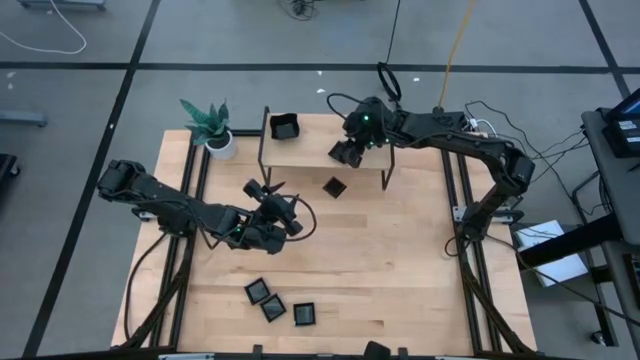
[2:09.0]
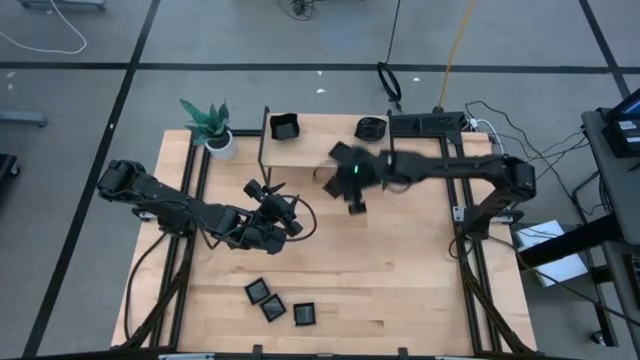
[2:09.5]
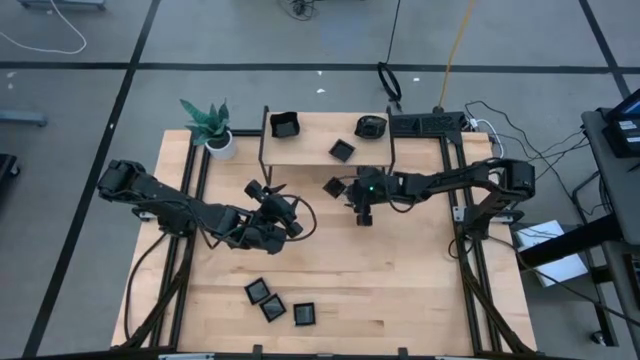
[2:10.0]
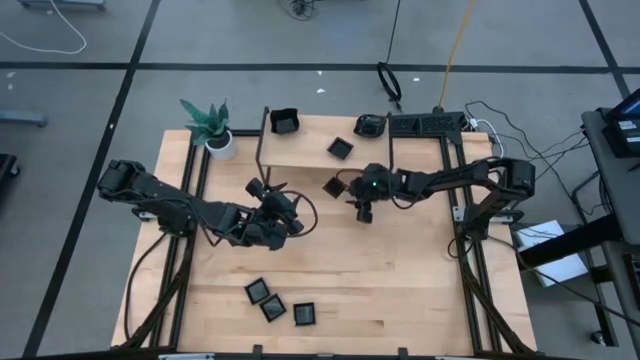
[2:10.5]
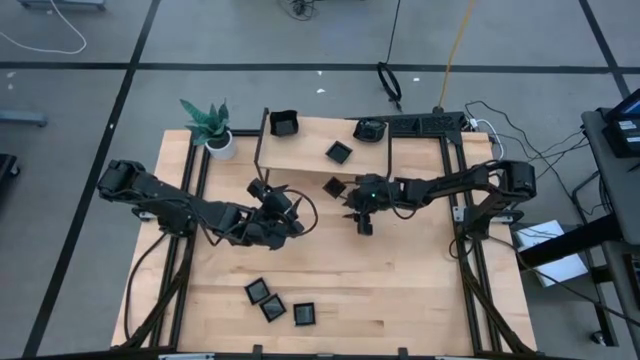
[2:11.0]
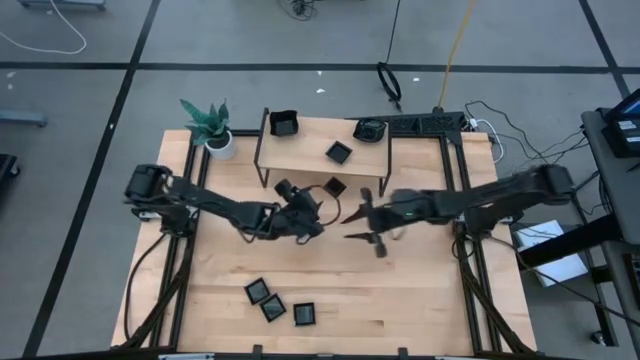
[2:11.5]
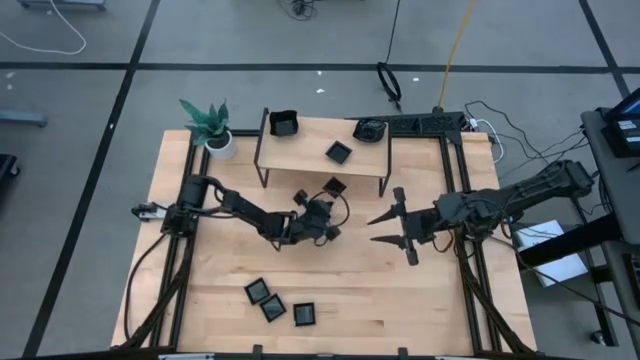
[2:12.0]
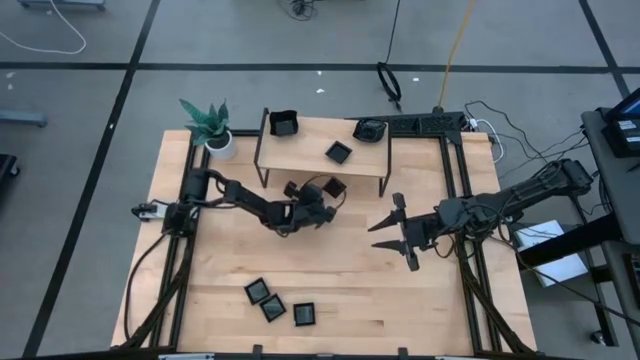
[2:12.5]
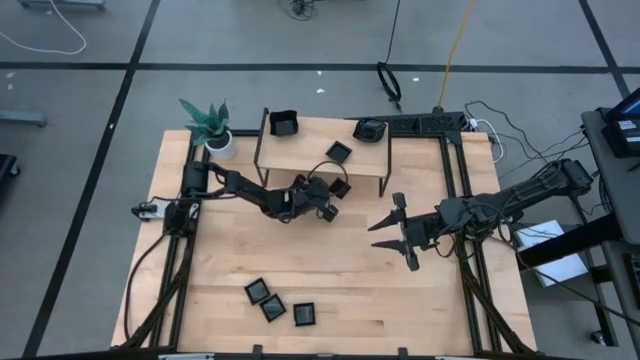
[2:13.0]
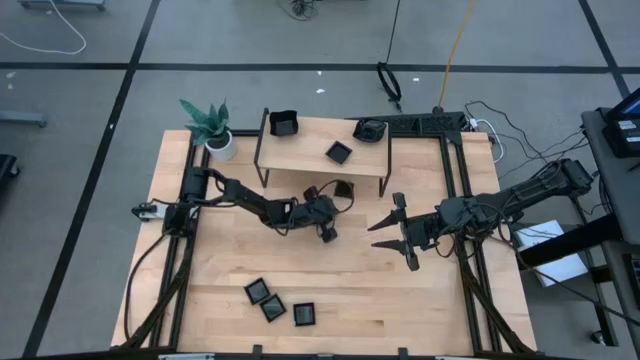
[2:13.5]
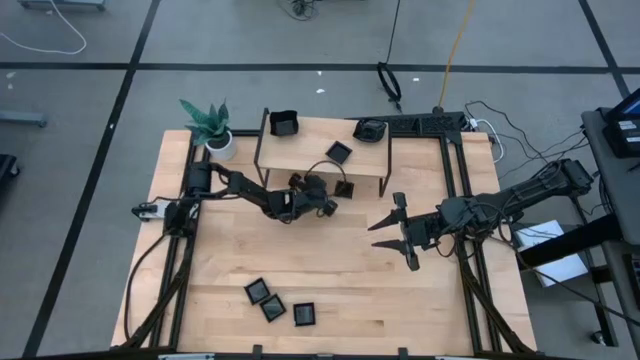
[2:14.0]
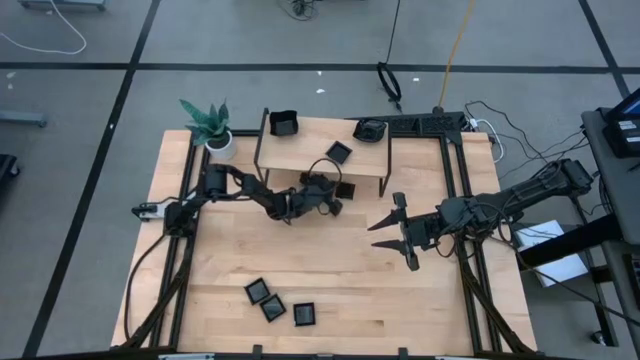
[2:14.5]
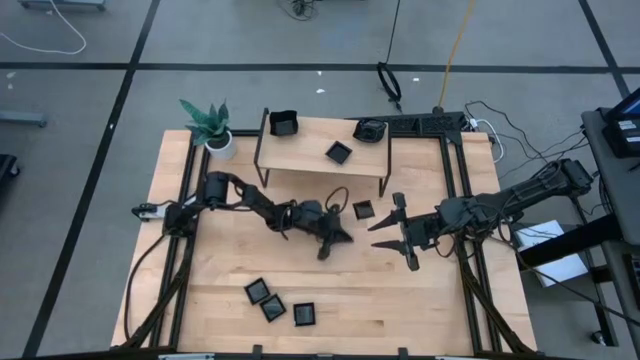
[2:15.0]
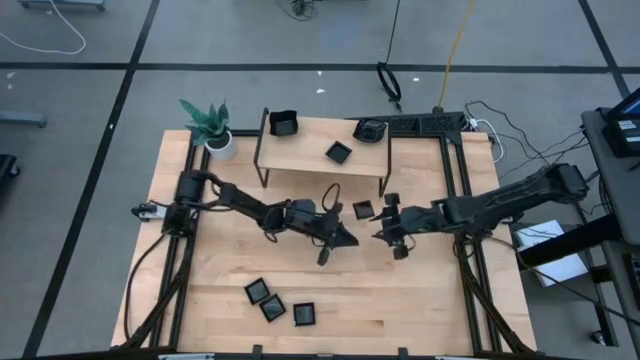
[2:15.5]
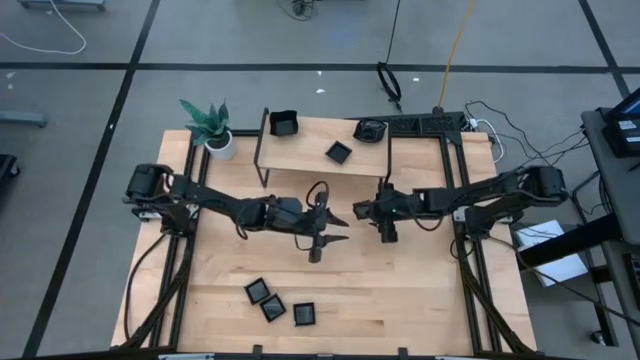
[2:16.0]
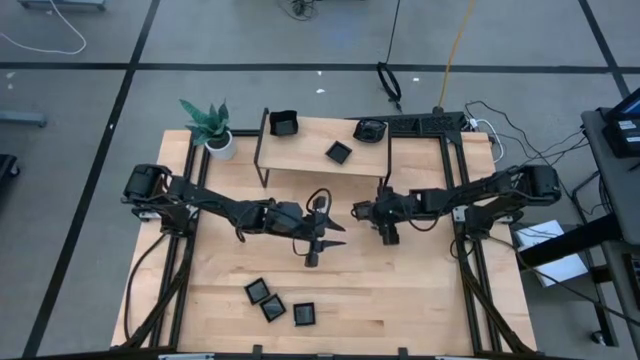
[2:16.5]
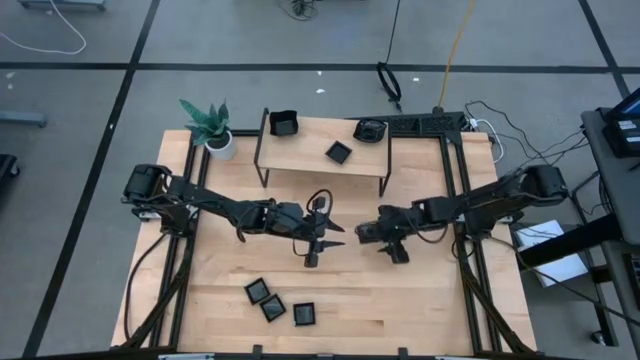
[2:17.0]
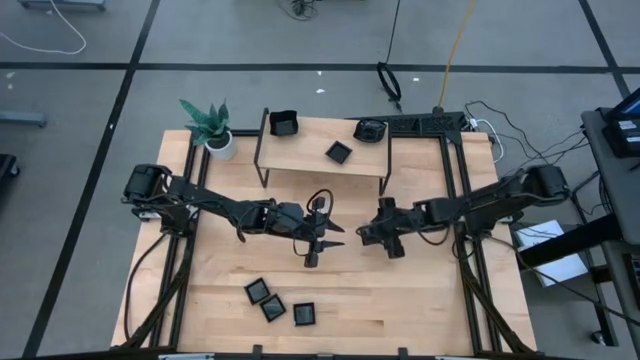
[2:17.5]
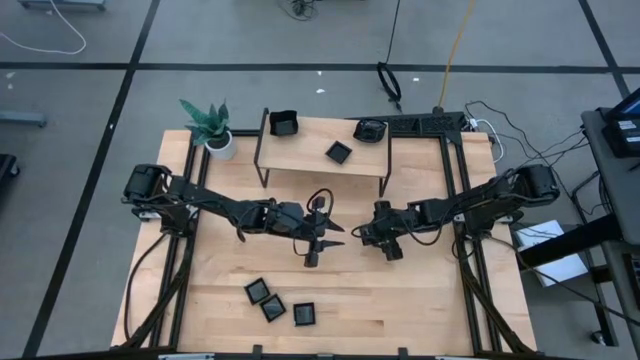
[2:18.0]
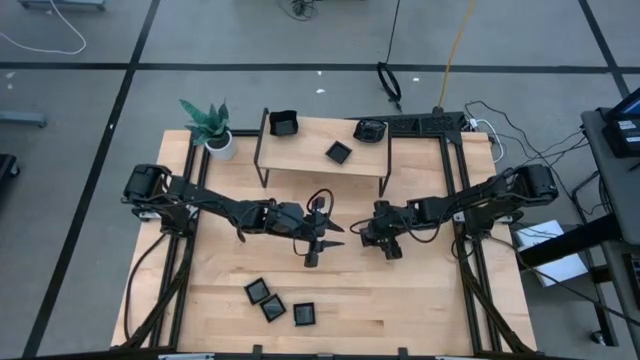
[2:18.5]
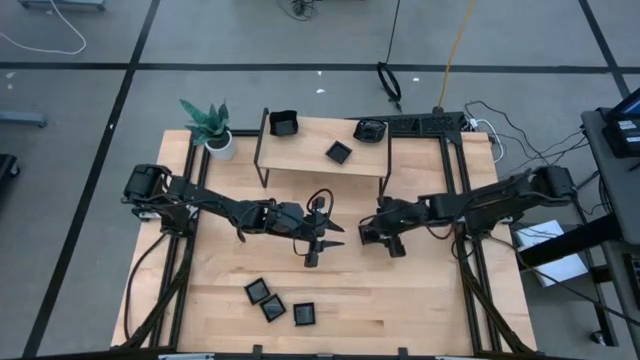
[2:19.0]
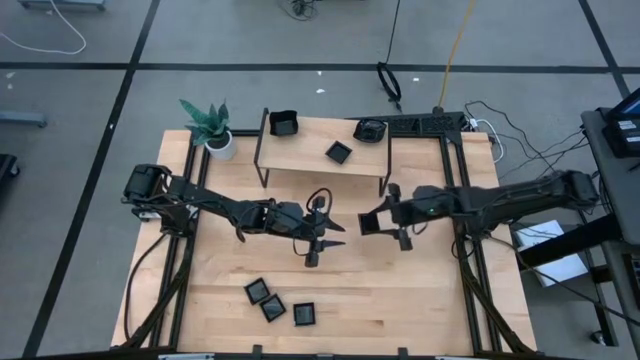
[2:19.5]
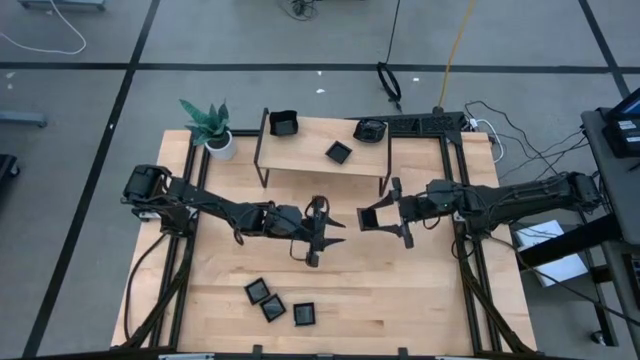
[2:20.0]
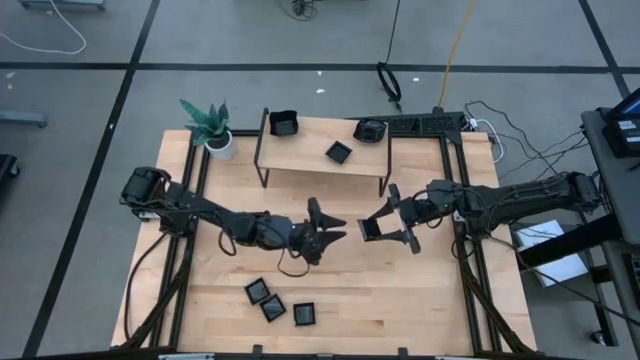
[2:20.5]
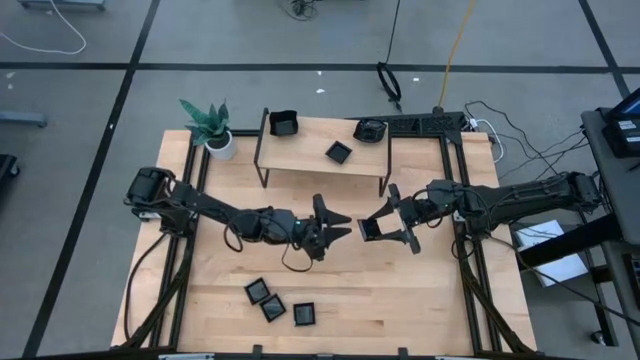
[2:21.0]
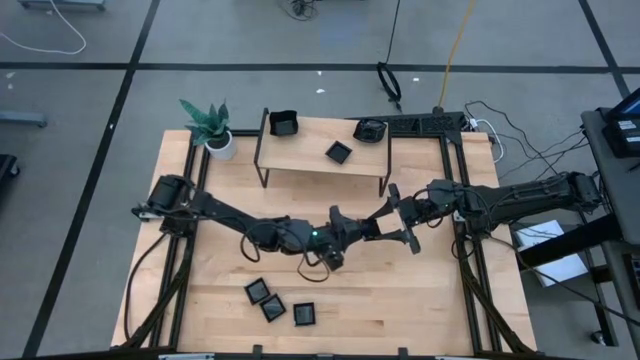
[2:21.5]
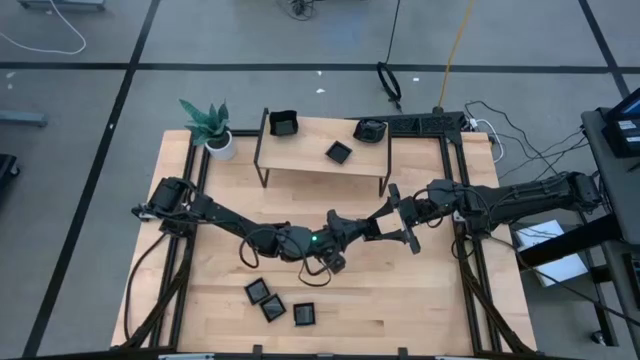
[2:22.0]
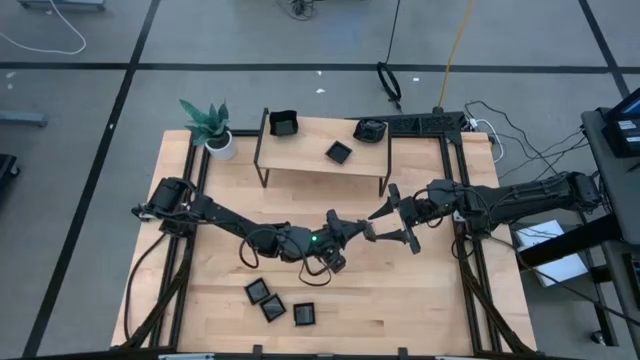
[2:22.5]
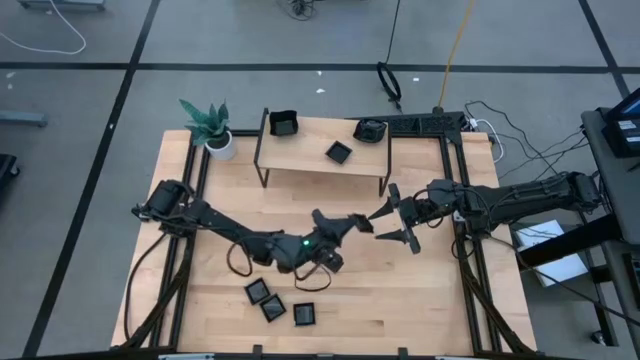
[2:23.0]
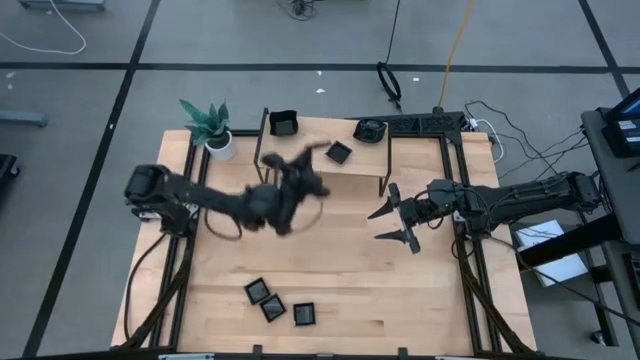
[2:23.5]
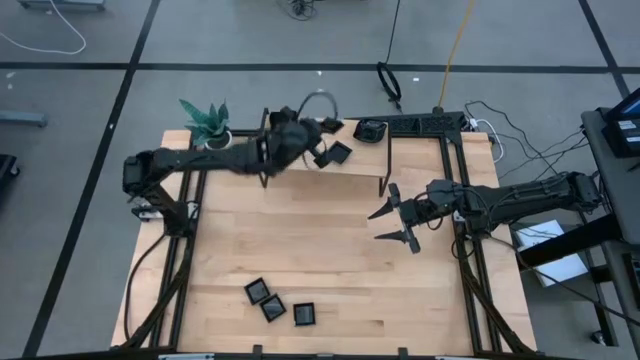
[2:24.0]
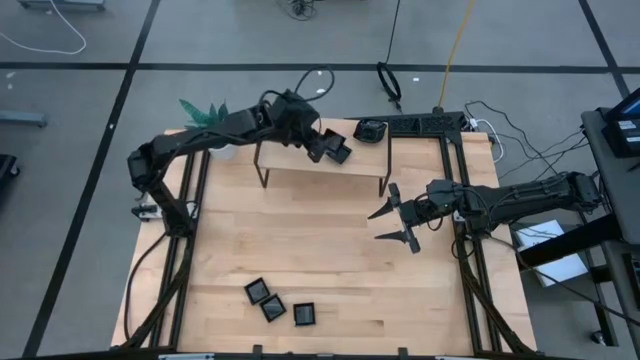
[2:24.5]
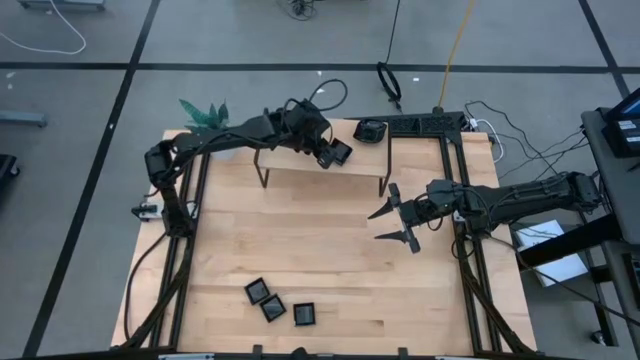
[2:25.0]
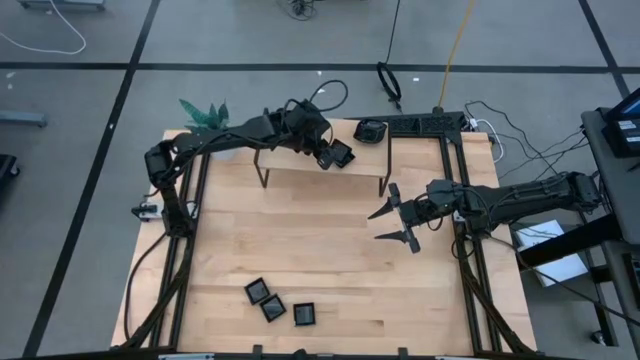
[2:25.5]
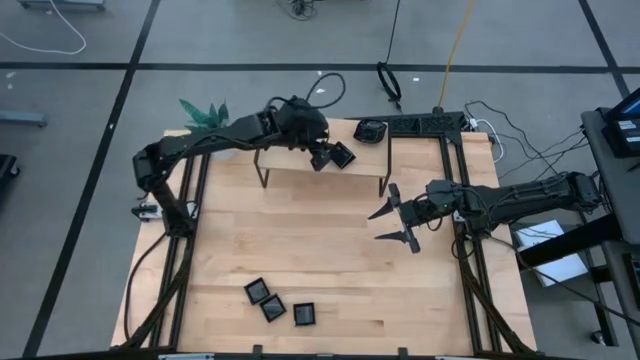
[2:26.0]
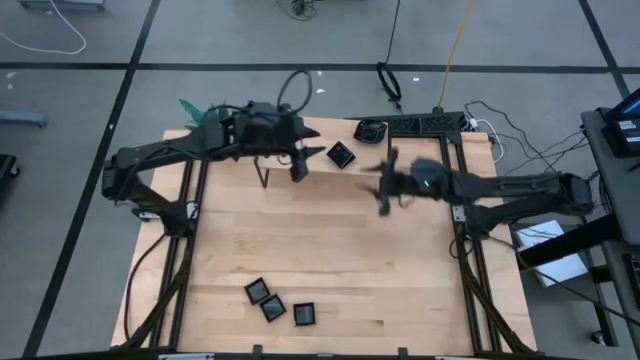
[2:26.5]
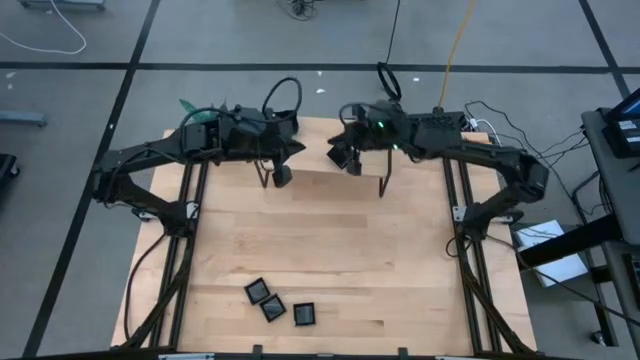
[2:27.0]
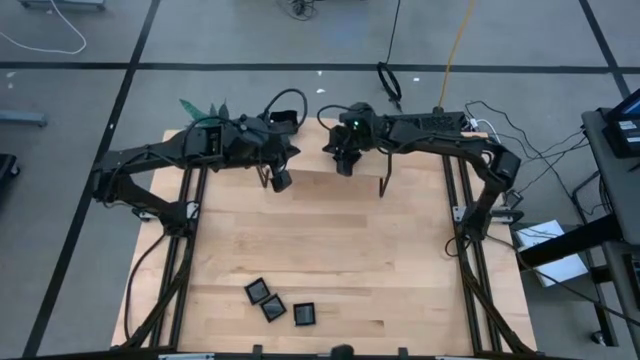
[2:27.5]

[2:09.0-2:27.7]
Task: Pick & Place Mini shaped plates
Stack the black square plate on top of the other black square plate on the shelf

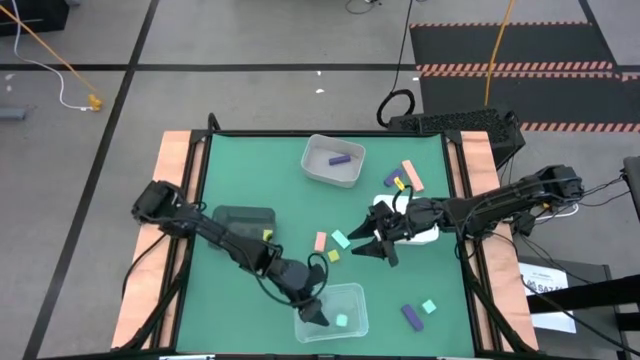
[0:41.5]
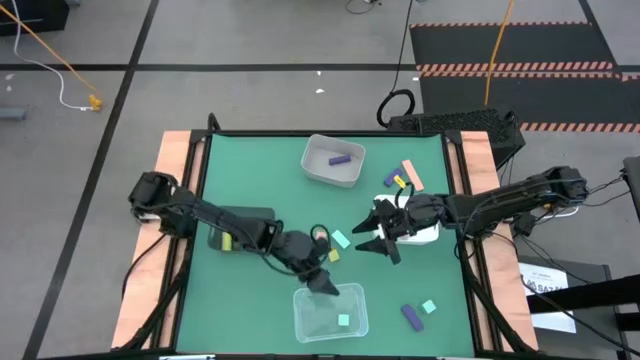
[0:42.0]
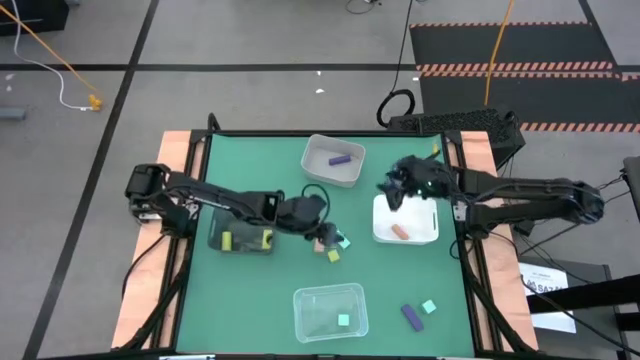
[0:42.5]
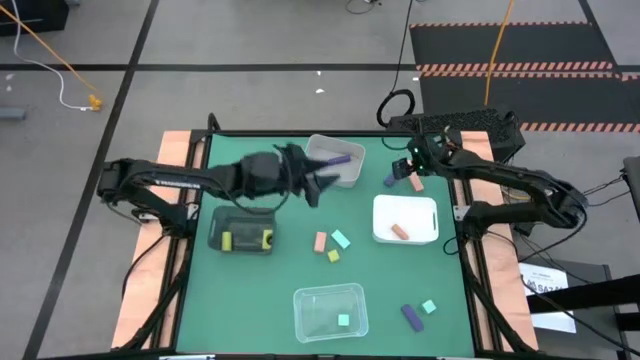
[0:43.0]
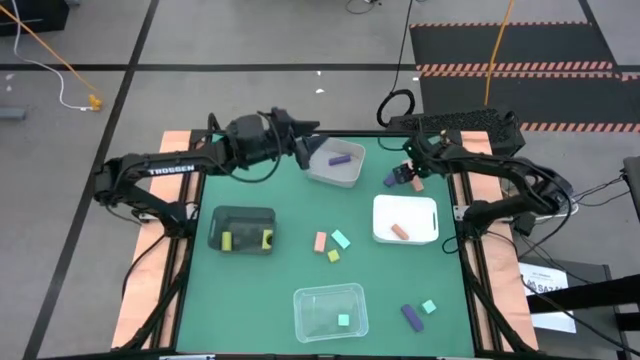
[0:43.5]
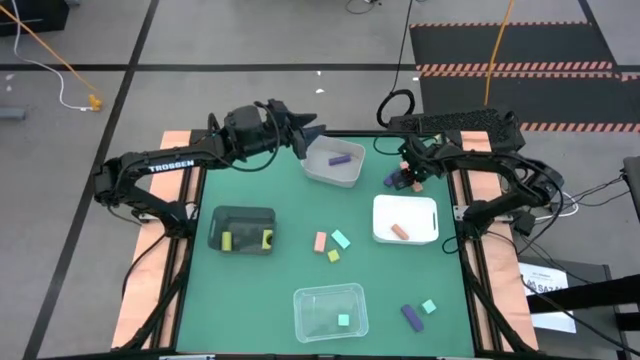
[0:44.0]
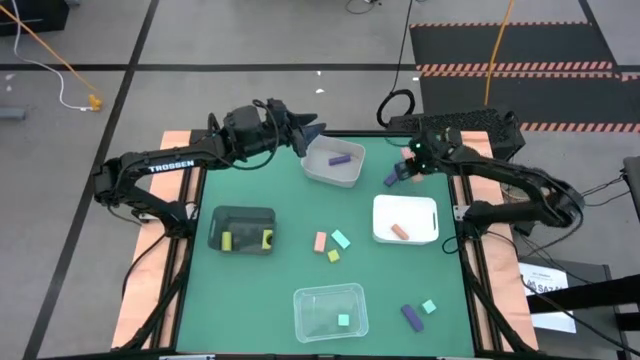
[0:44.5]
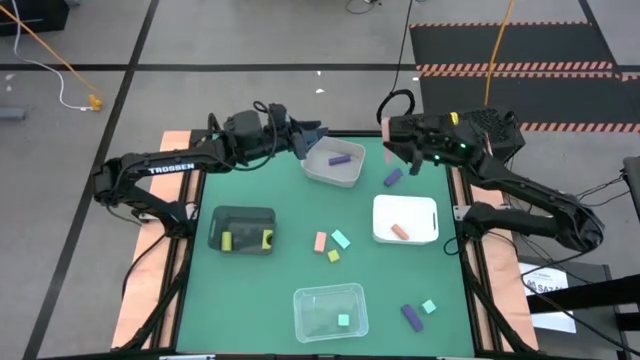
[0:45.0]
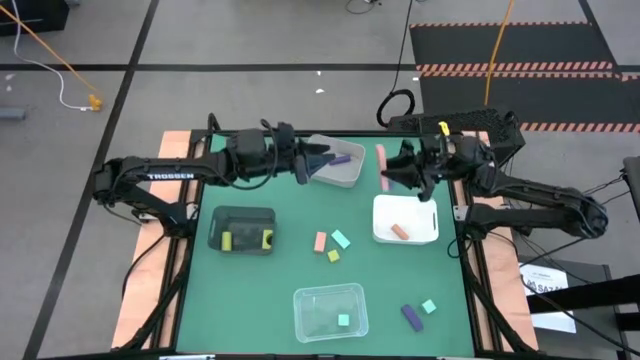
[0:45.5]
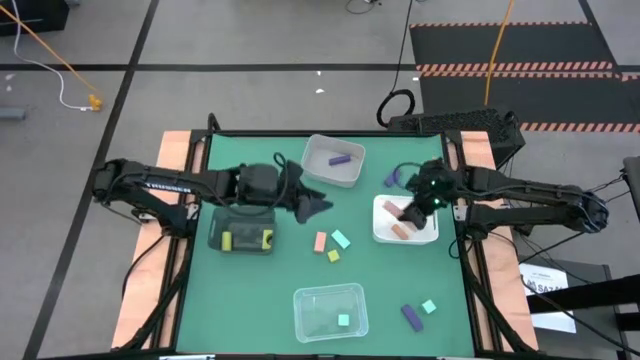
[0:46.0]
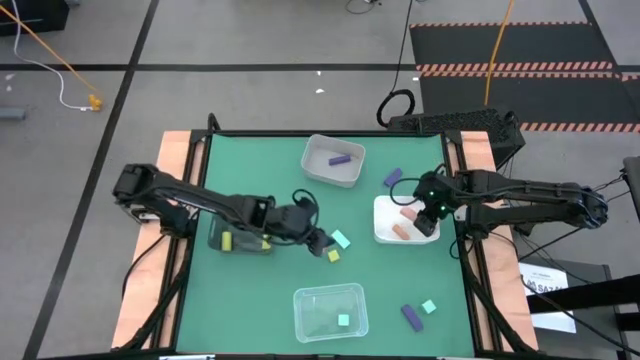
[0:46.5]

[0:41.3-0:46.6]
Task: Sort & place blocks by color
Put the right pink block into the white bin
